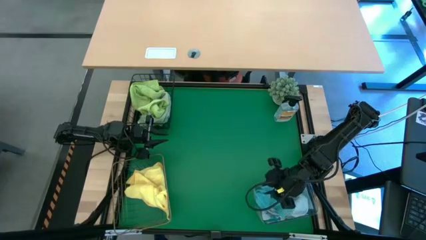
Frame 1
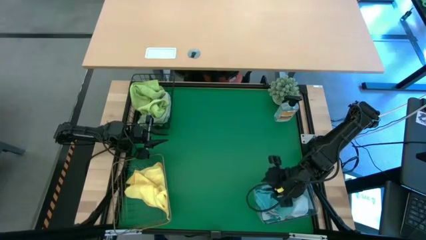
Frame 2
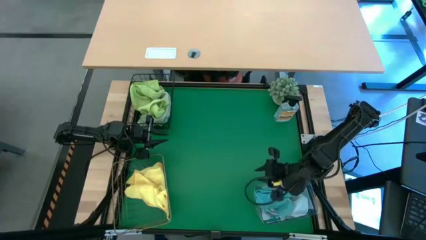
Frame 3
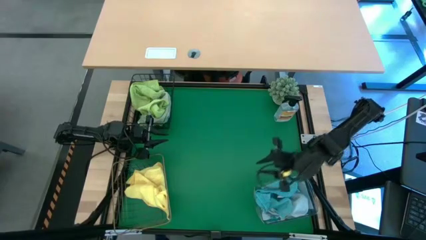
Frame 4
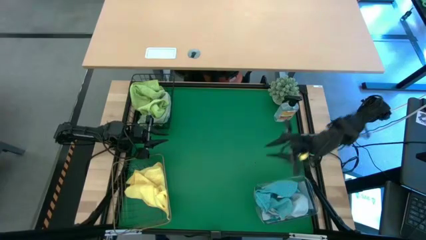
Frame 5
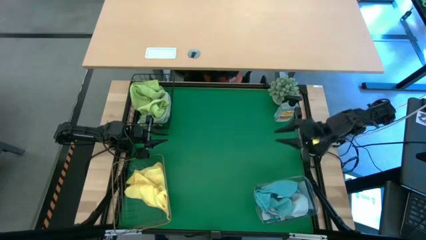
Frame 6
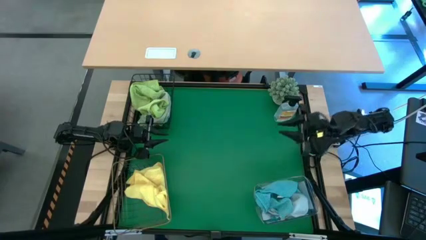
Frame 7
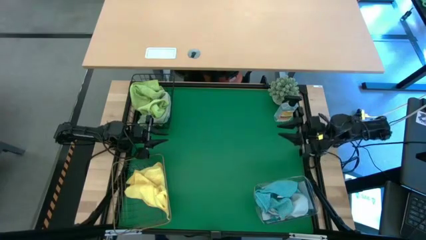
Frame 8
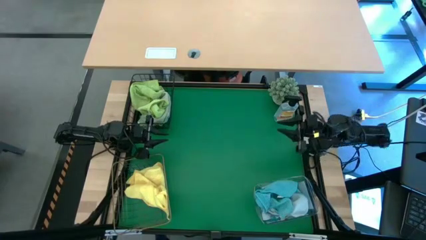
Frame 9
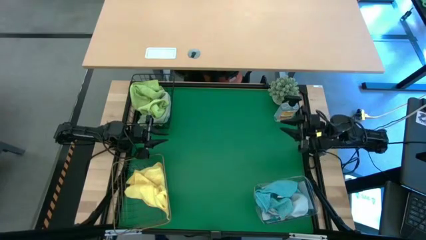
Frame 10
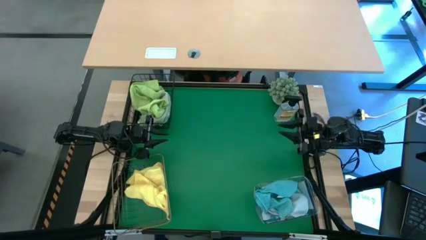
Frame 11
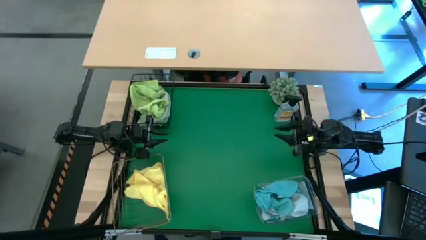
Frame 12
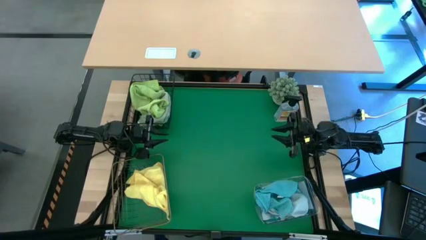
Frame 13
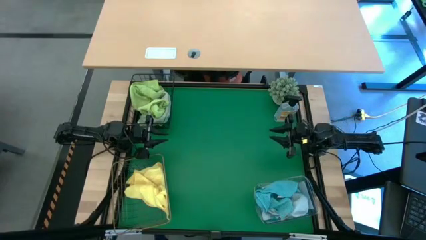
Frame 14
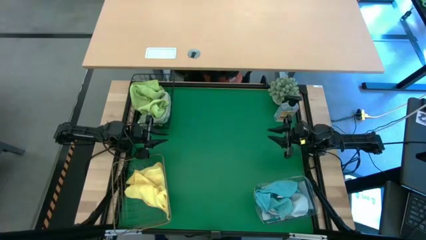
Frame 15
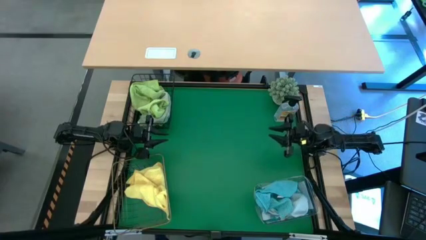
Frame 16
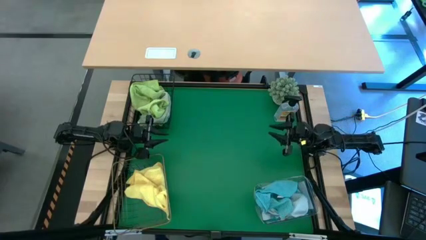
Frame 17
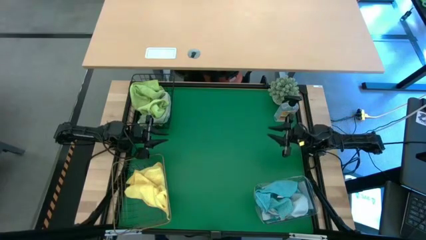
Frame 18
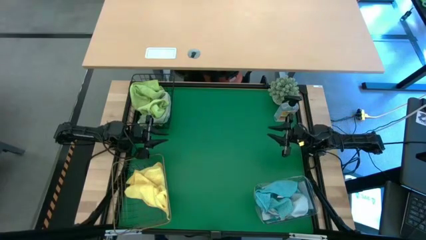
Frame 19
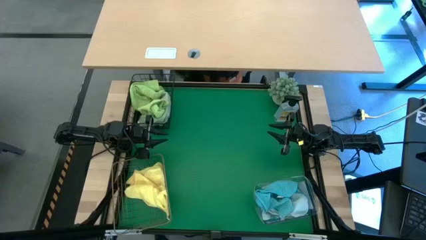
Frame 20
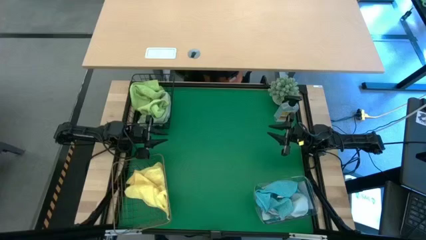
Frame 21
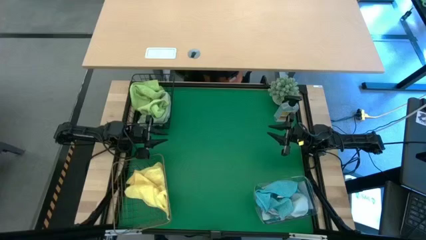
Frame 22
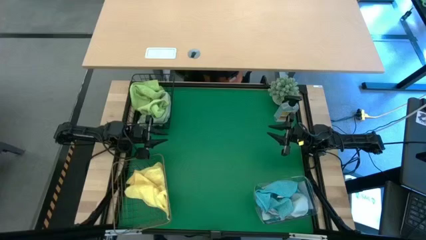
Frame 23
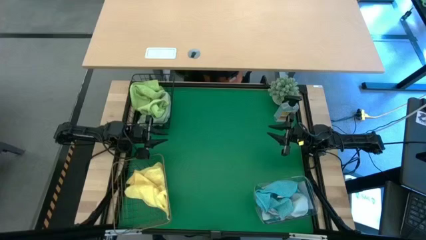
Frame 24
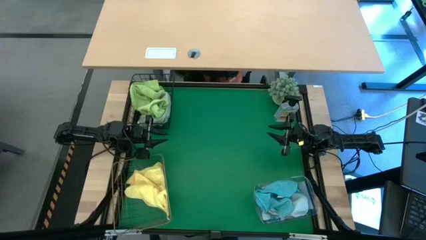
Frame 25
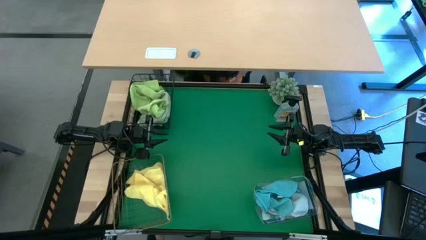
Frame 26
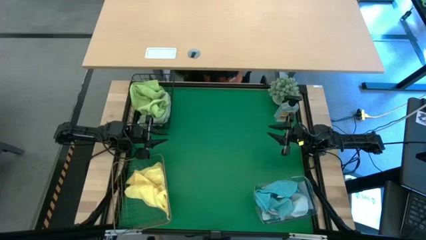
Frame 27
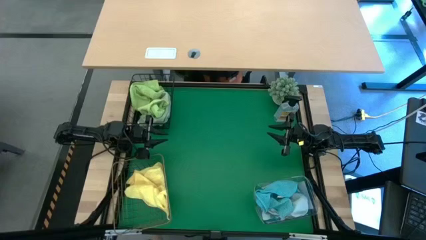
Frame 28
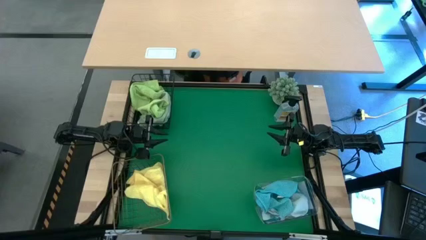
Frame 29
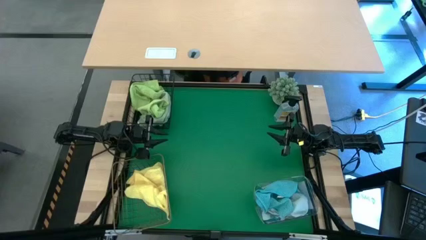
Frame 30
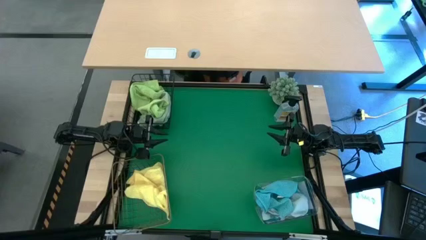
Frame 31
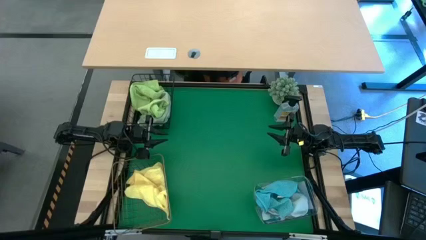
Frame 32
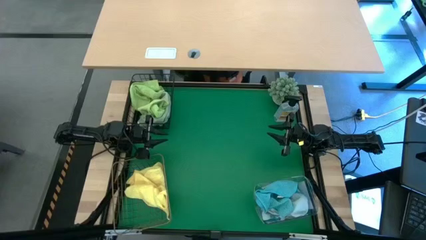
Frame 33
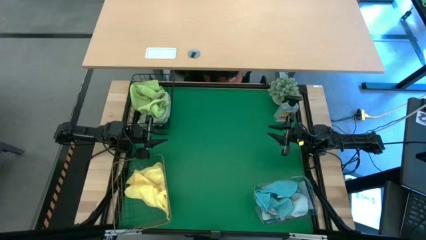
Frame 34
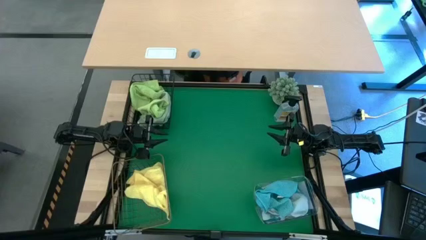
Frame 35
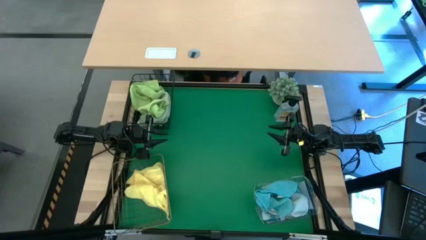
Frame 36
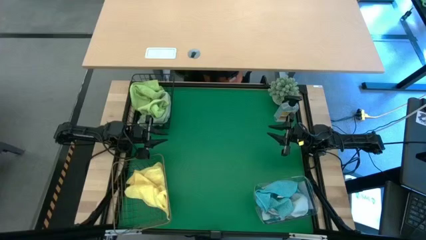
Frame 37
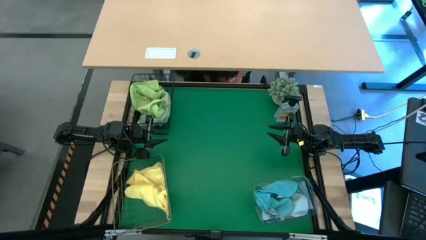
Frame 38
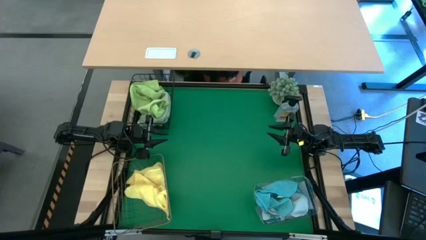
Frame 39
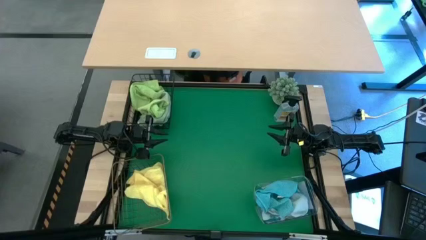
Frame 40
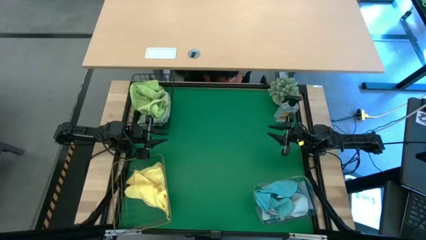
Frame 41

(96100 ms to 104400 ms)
Task: Sort microfiber towel by color & place in baskets
Return to Home Position

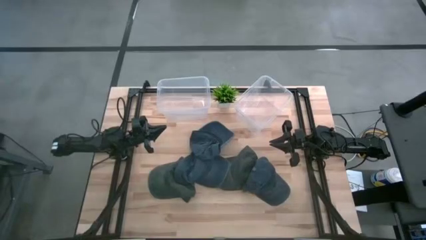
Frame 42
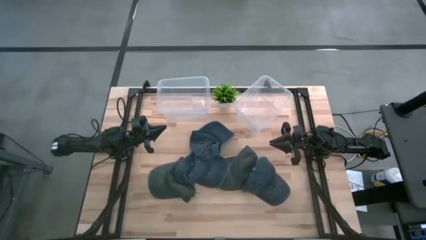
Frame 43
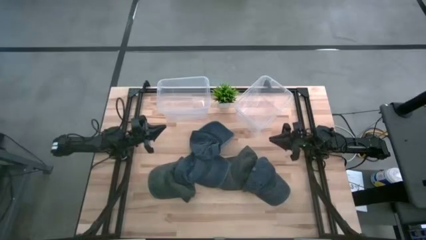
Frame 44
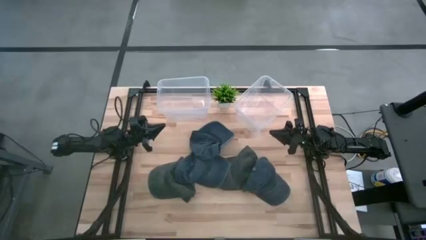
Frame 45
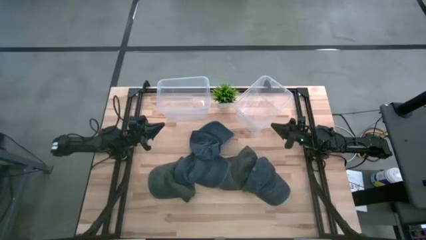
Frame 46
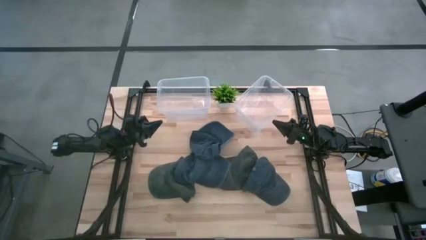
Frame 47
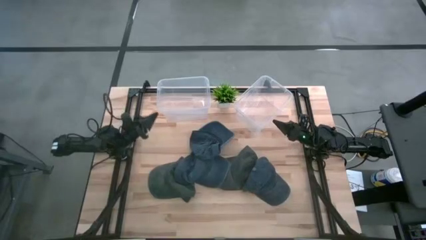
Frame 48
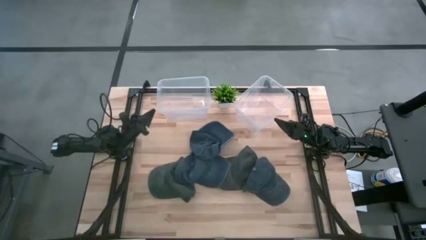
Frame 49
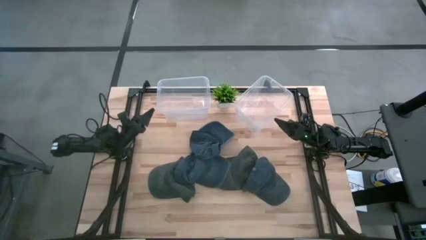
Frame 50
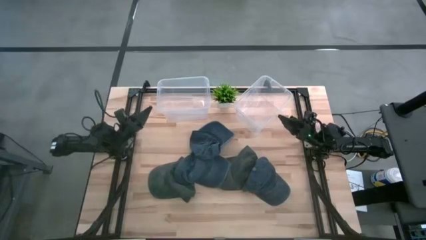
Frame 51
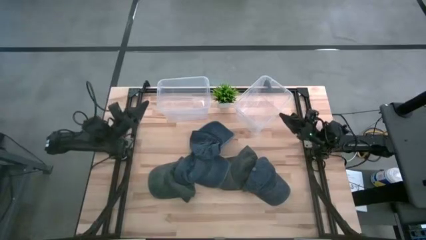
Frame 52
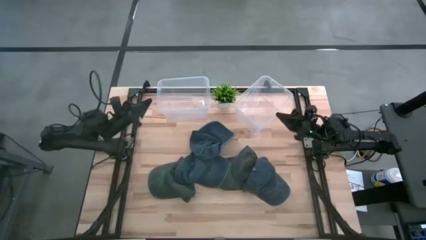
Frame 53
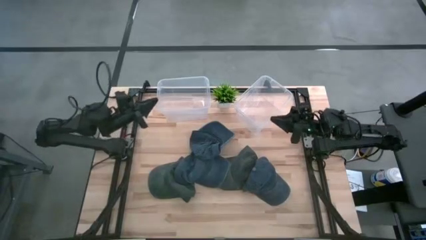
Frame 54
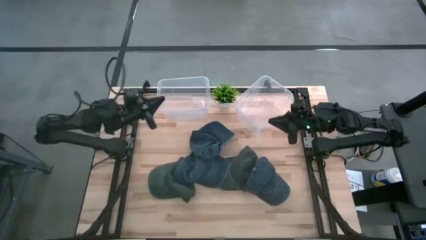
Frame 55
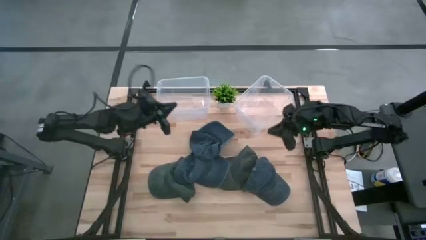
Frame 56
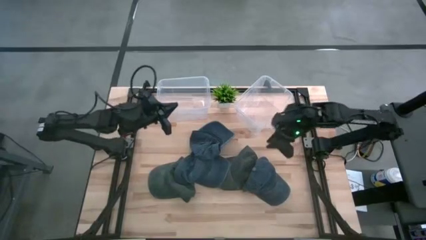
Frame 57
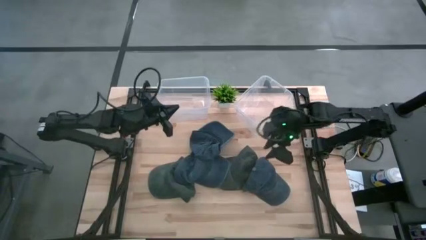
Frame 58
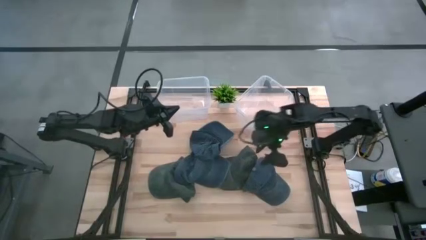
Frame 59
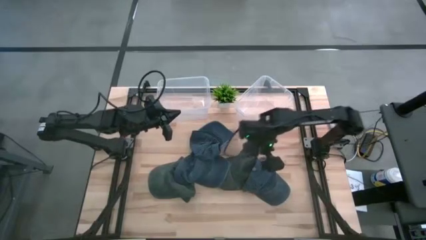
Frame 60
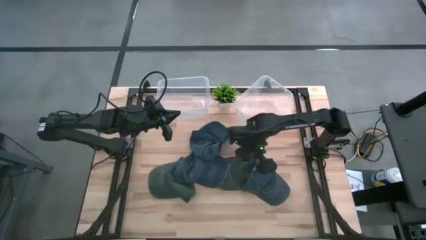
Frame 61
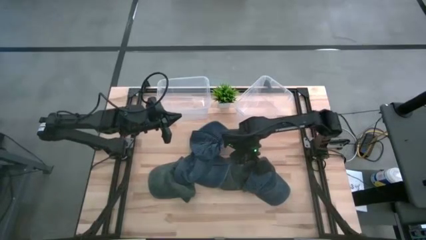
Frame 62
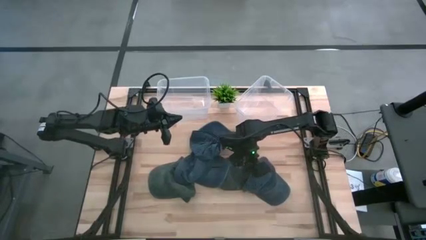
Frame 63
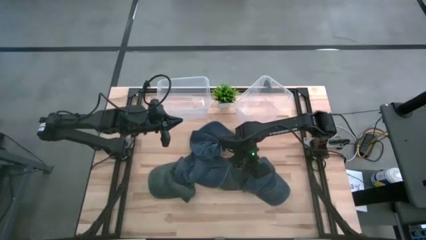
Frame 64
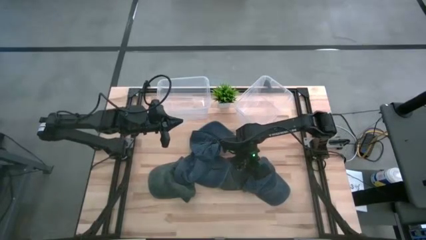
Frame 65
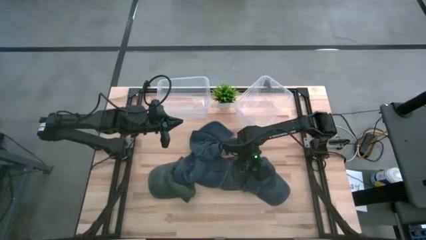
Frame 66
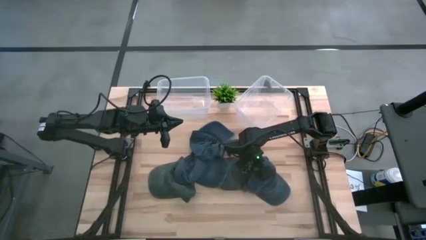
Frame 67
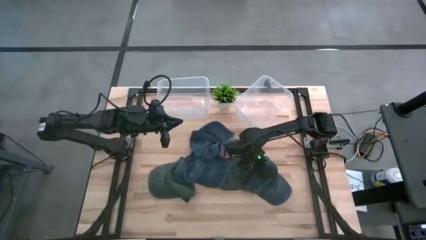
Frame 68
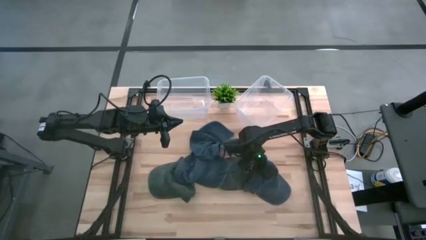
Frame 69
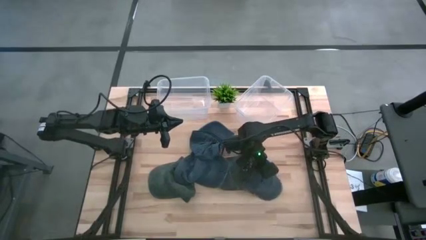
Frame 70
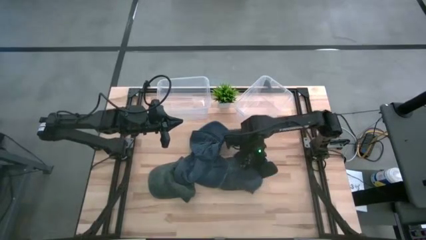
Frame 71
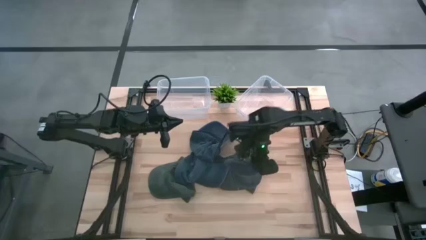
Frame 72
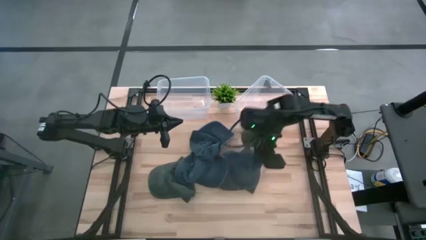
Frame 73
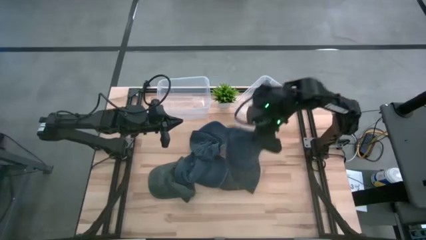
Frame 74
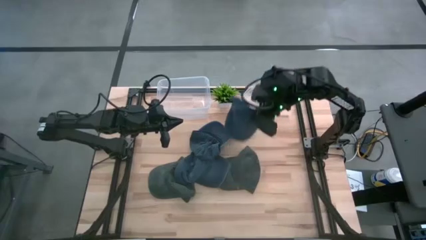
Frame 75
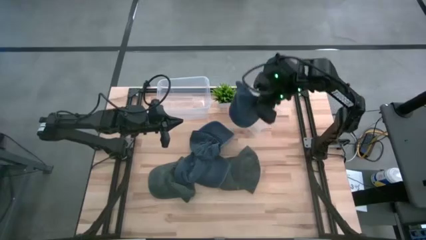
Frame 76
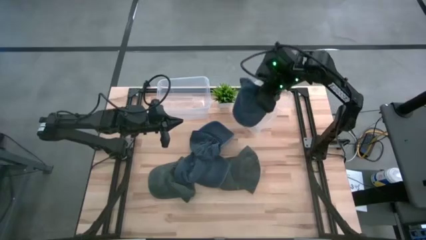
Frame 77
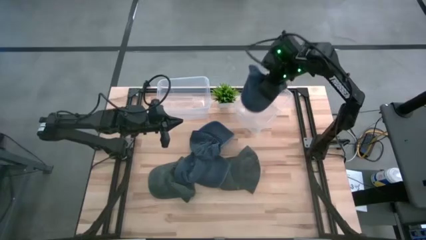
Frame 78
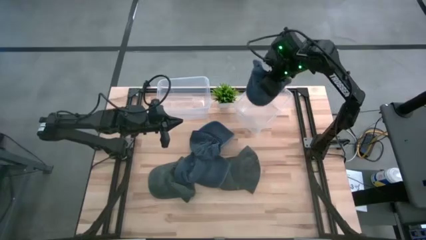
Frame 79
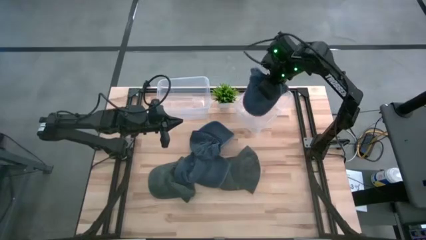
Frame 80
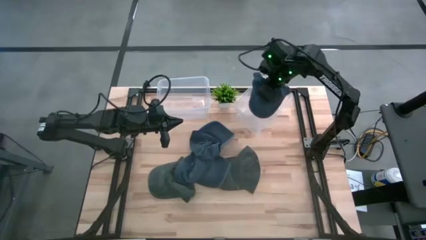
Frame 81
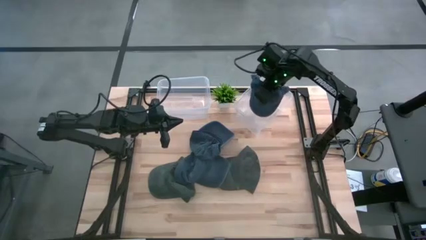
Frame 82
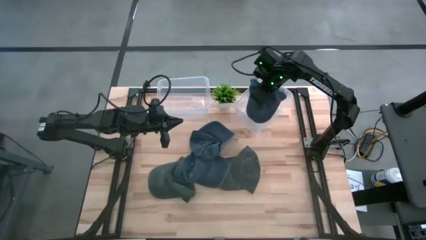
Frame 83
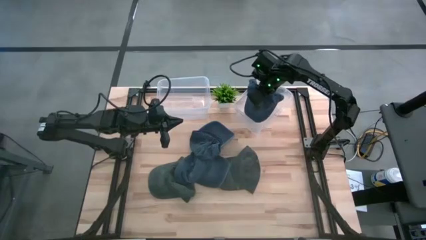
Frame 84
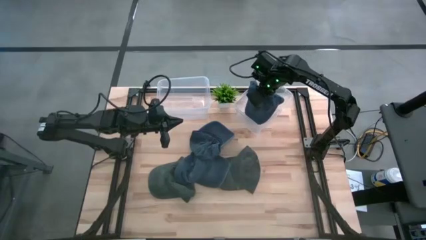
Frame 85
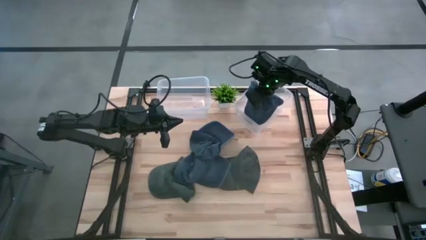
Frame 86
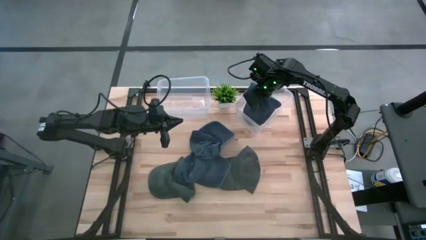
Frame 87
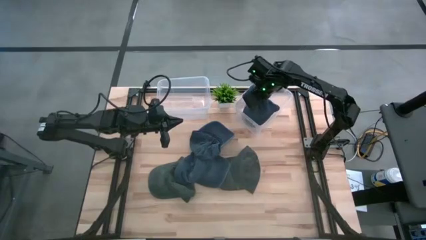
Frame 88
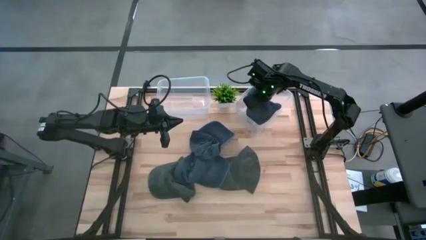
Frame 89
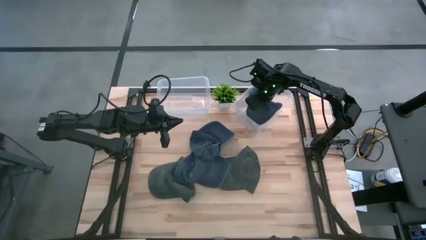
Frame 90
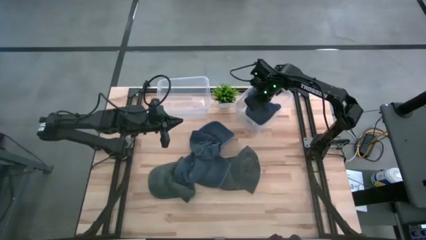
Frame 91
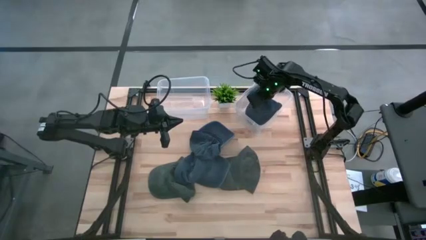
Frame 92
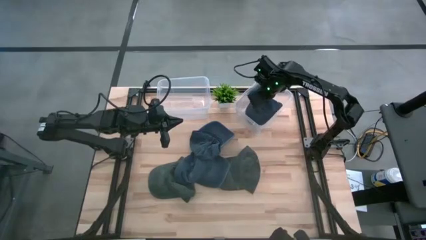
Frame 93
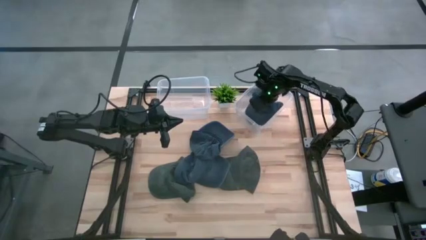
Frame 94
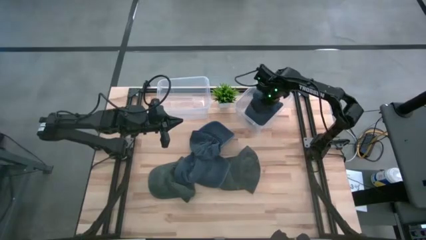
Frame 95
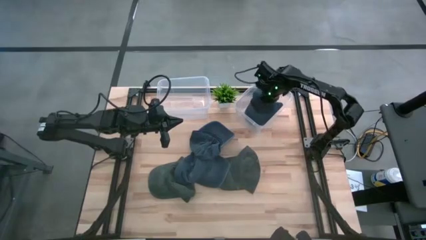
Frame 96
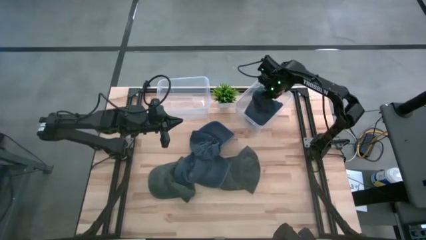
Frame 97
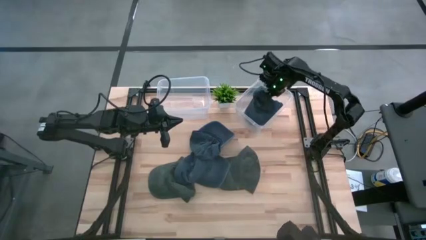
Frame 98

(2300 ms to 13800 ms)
Task: Pick and place caps into container
Put the right blue cap into the right transparent container
